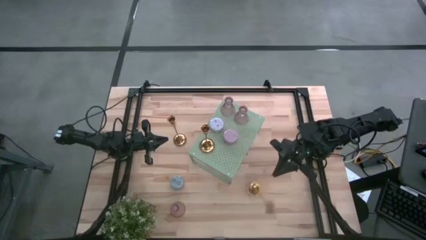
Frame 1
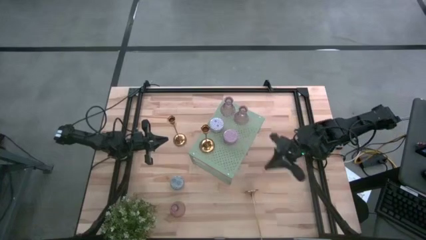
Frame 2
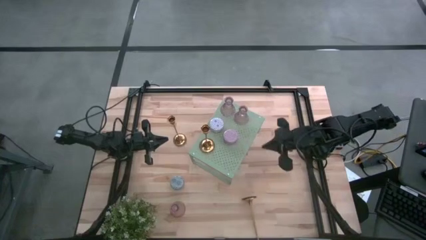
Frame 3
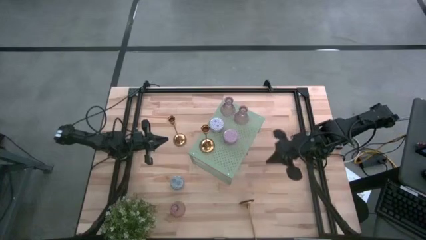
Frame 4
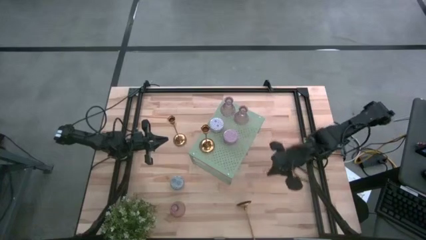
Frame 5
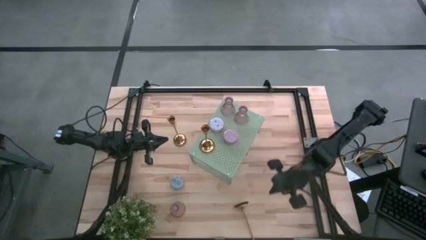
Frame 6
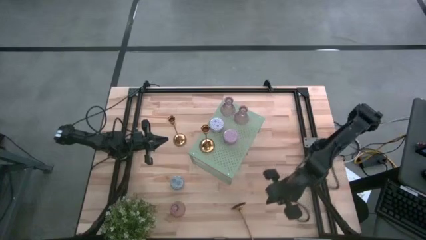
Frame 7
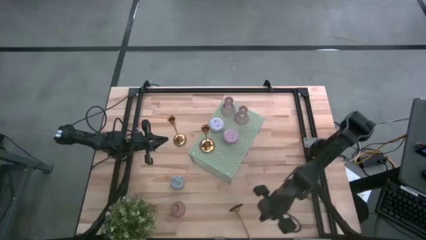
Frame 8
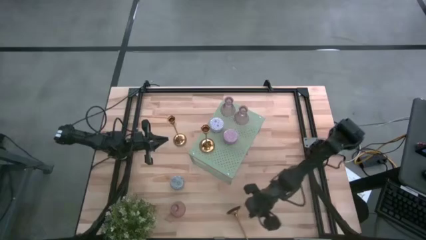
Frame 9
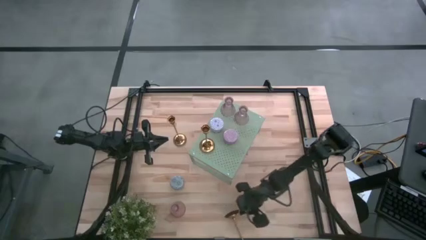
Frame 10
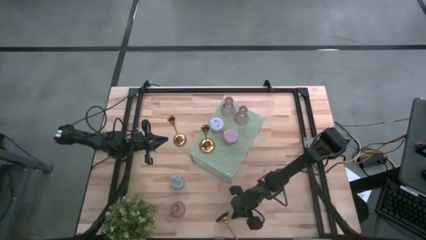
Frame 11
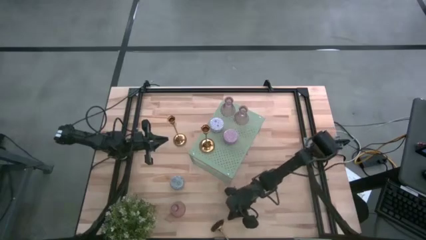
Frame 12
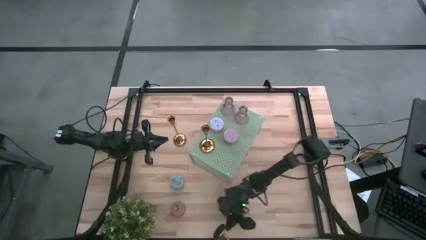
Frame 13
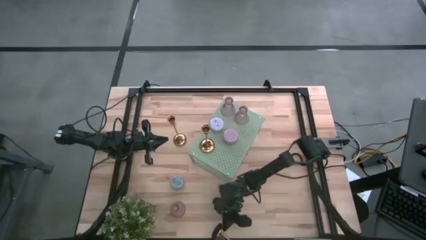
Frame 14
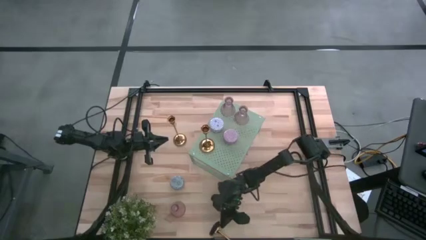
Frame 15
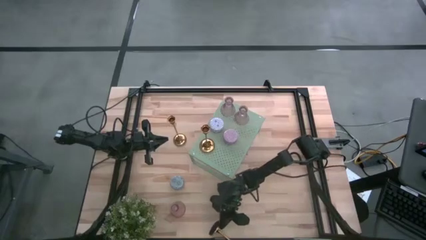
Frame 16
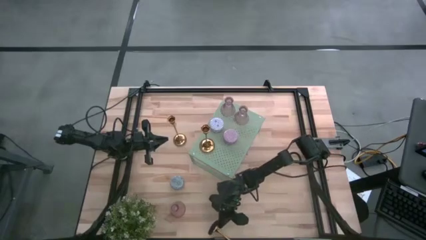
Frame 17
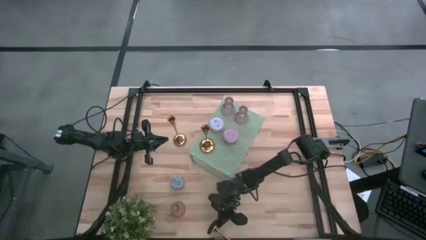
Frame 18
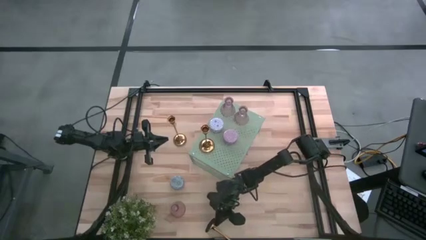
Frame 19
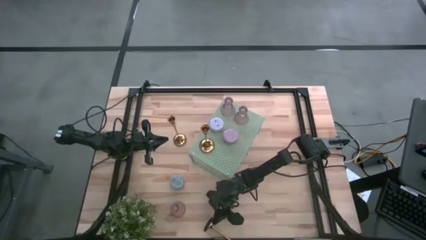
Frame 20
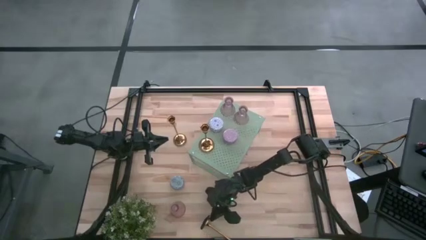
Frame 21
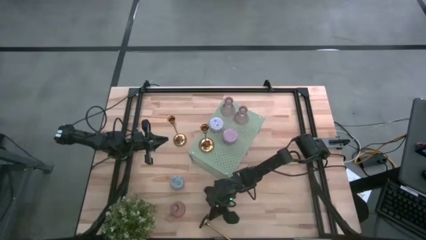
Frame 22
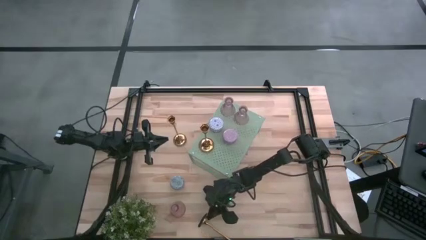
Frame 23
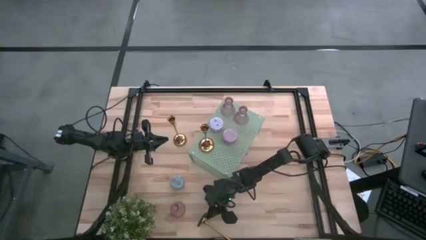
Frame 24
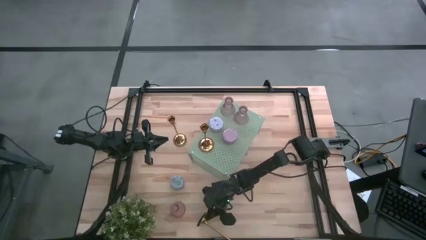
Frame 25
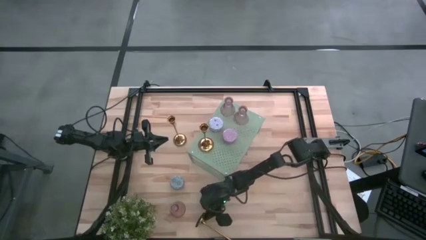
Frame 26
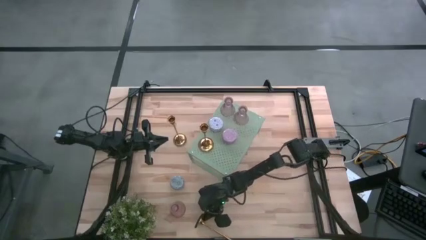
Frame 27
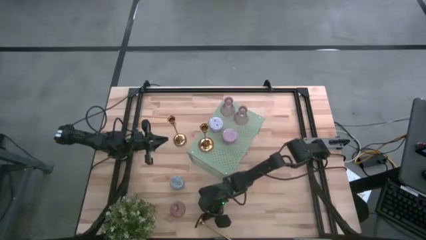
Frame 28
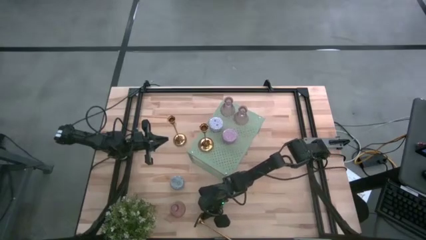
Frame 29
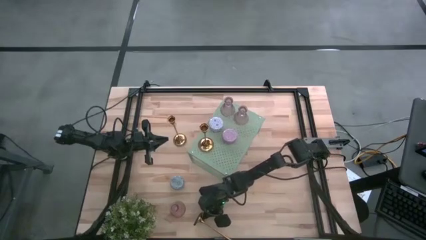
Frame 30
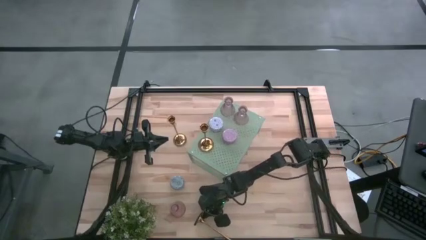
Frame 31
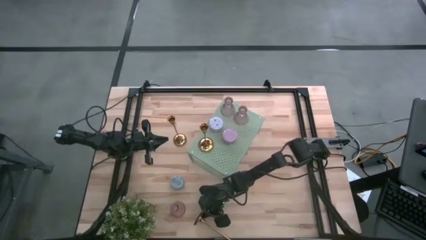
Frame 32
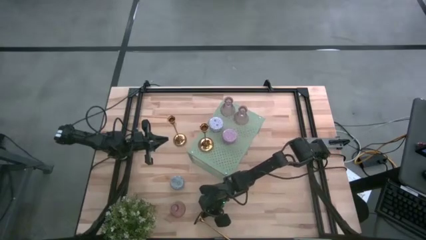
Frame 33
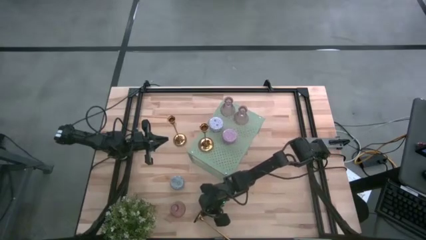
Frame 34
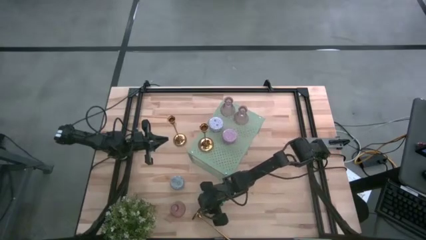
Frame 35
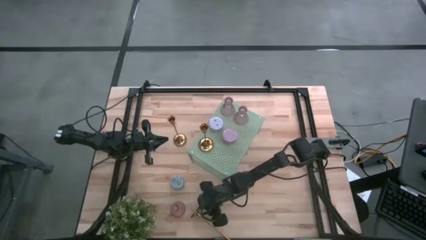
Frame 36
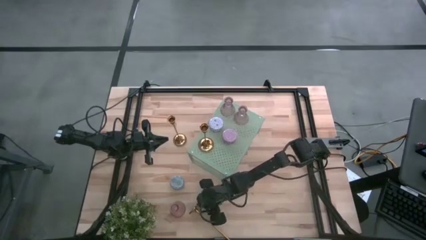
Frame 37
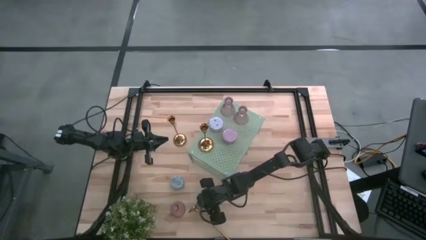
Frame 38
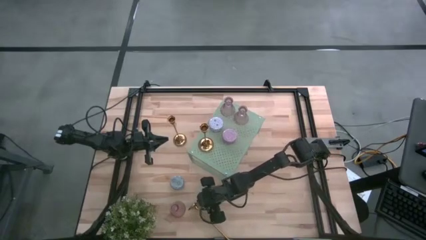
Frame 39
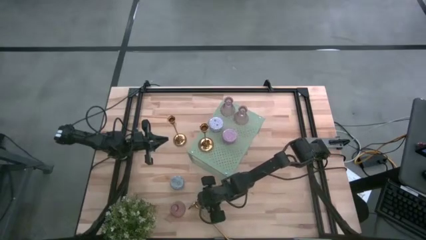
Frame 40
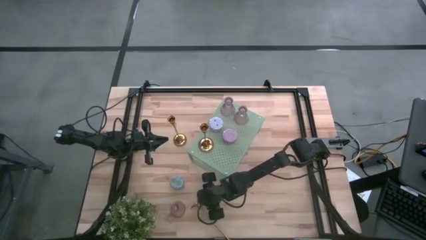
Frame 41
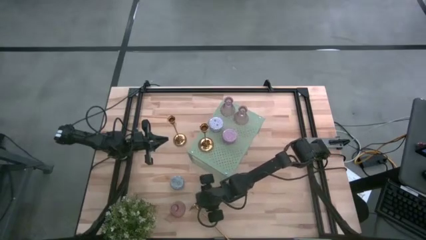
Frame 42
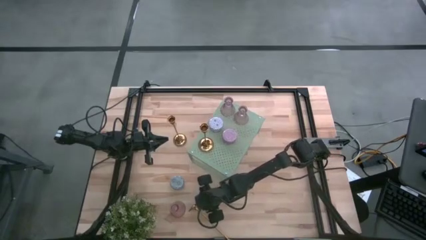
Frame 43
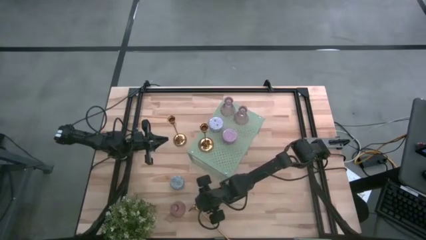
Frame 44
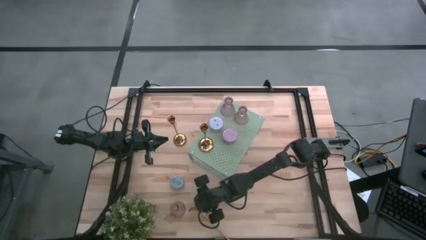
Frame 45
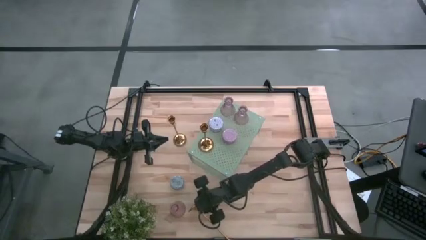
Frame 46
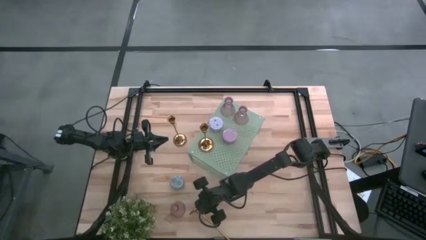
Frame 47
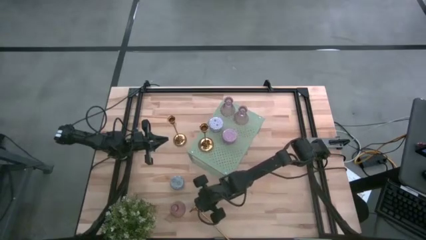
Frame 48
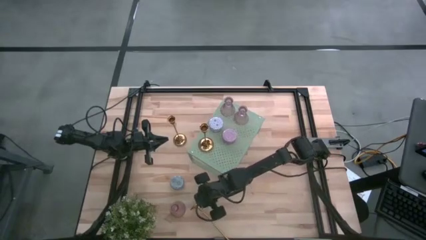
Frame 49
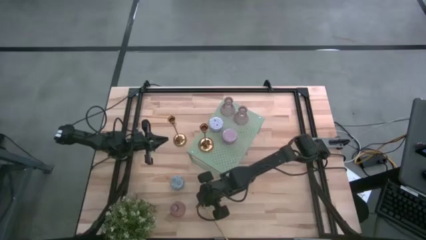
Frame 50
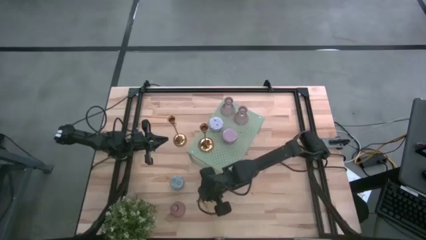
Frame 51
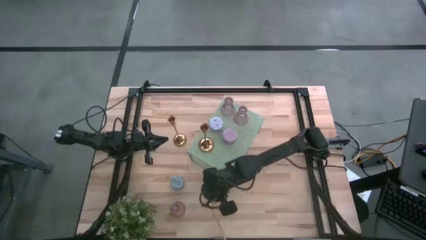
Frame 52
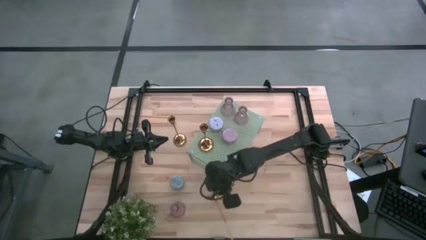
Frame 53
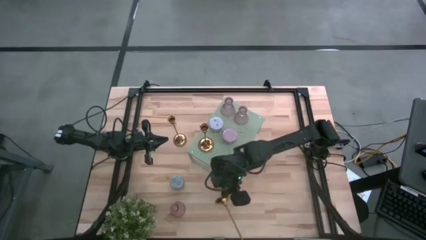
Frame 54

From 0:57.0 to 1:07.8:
Task: Pick & Place candle stick holders
Put the right gold candle holder aligned with the other gold candle holder on the shelf
